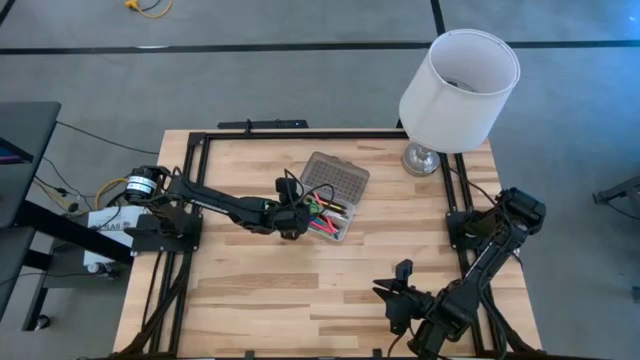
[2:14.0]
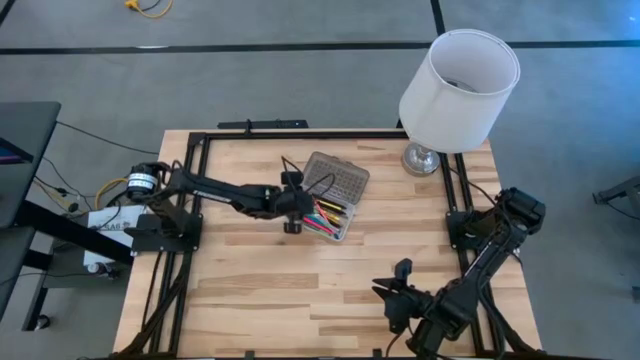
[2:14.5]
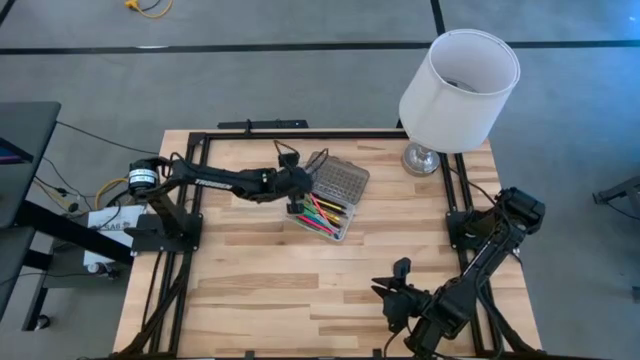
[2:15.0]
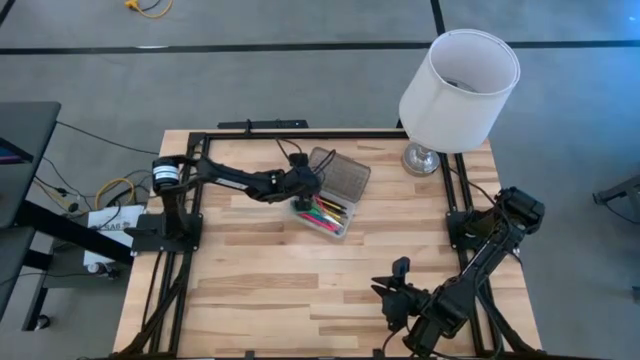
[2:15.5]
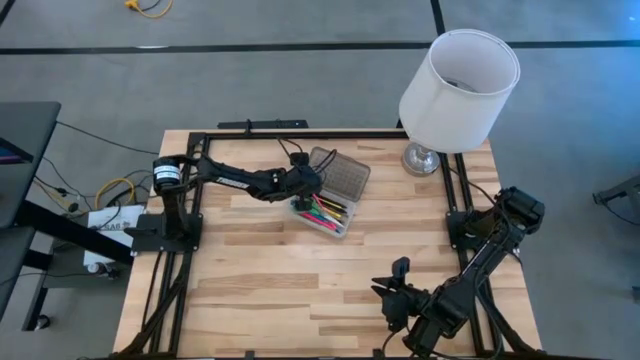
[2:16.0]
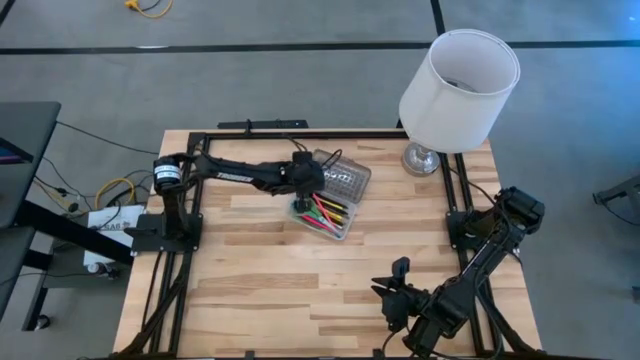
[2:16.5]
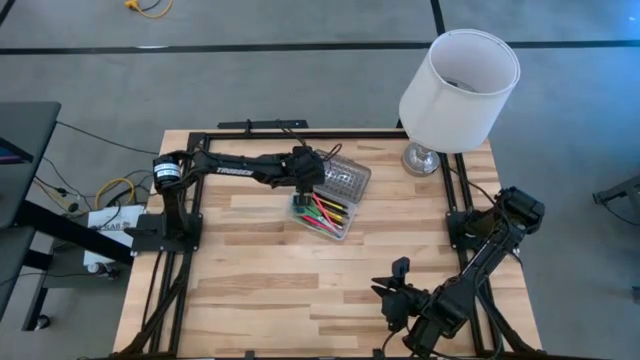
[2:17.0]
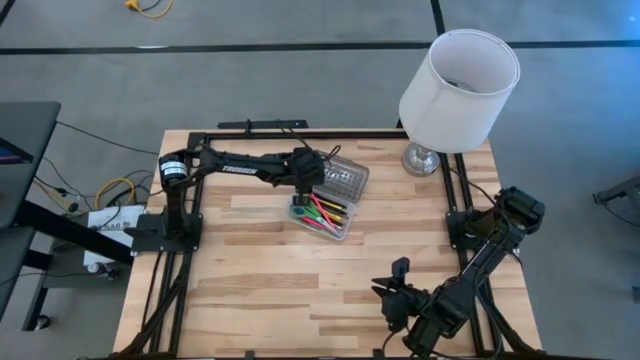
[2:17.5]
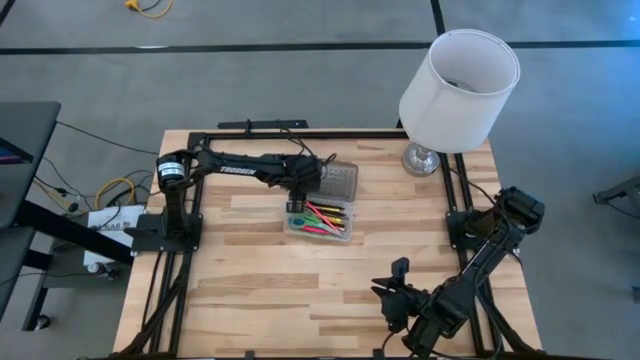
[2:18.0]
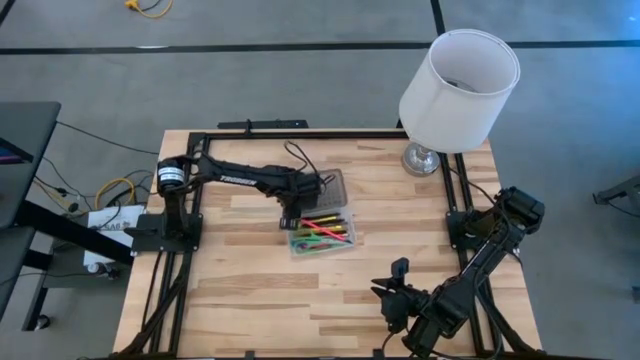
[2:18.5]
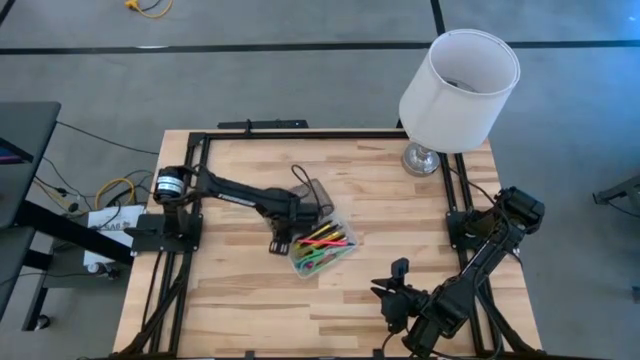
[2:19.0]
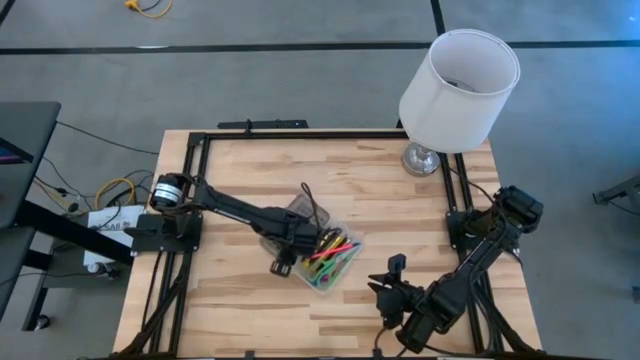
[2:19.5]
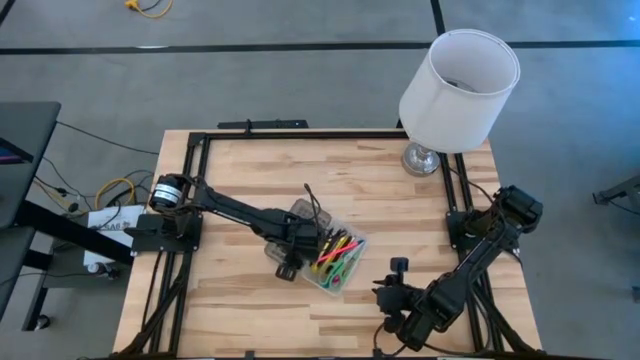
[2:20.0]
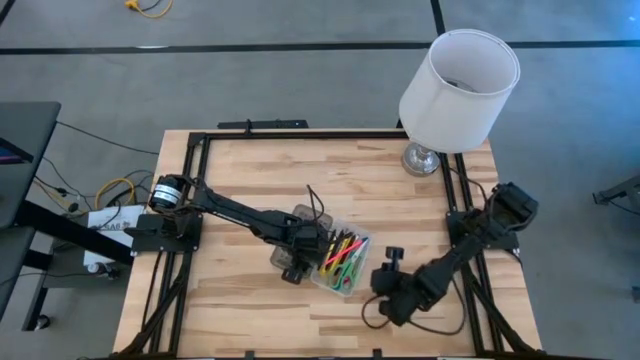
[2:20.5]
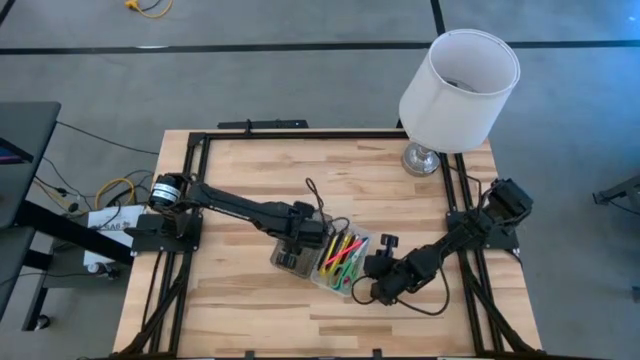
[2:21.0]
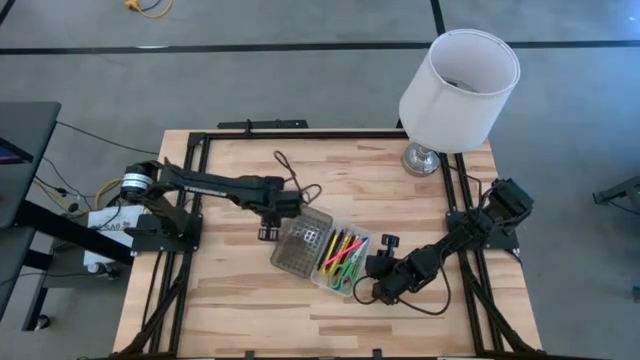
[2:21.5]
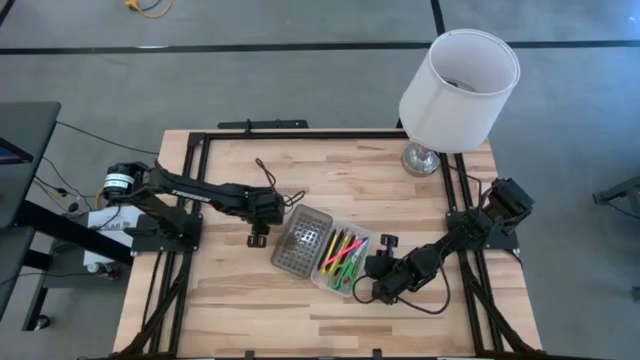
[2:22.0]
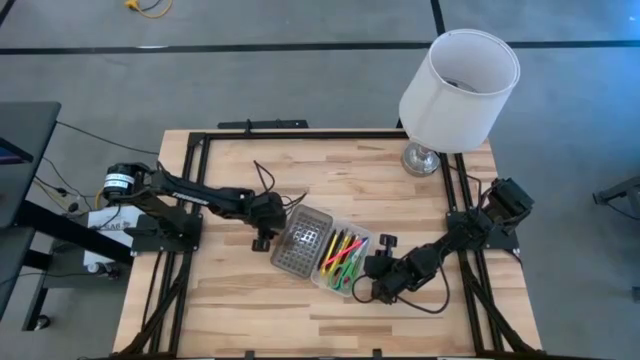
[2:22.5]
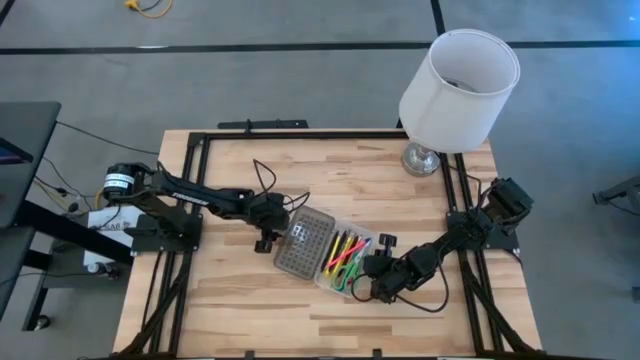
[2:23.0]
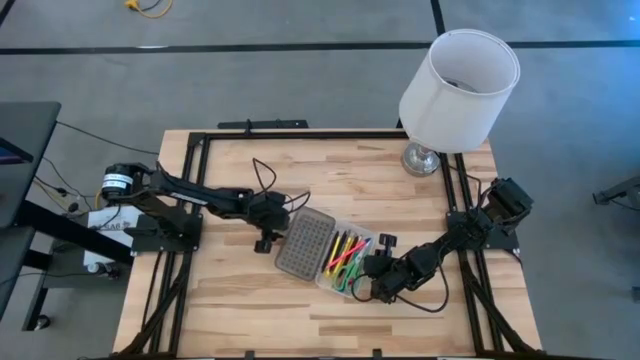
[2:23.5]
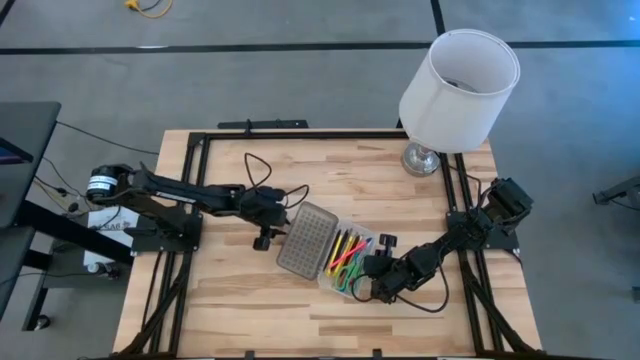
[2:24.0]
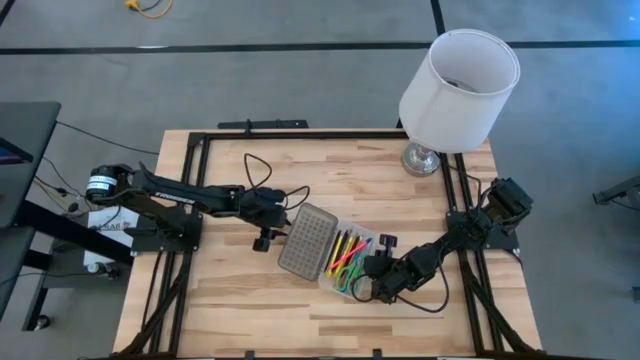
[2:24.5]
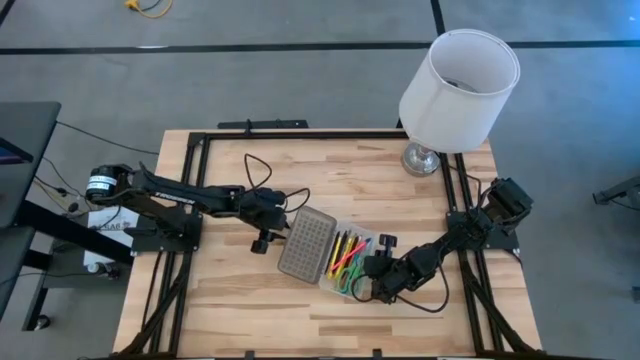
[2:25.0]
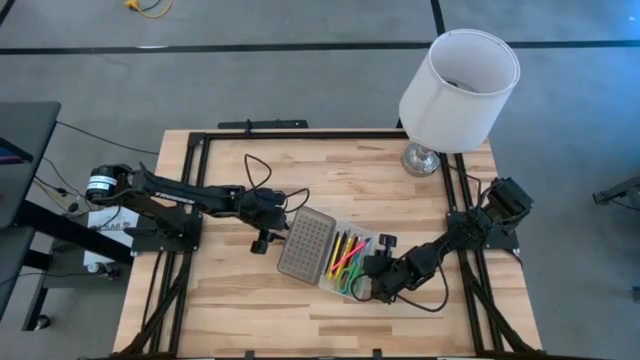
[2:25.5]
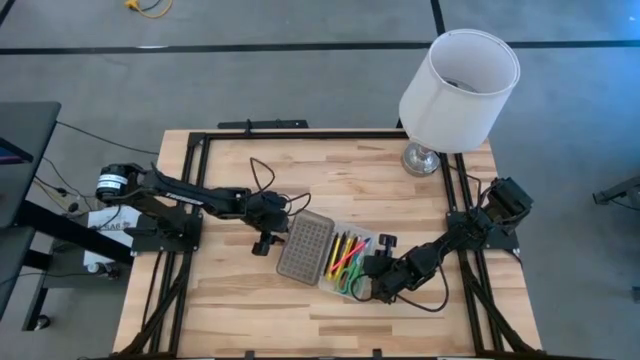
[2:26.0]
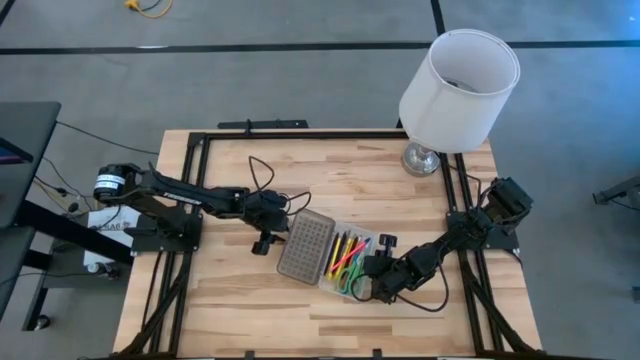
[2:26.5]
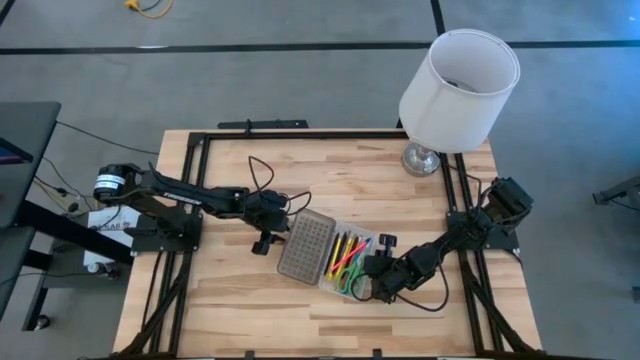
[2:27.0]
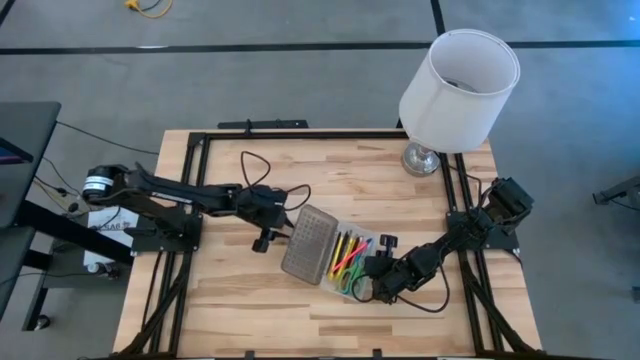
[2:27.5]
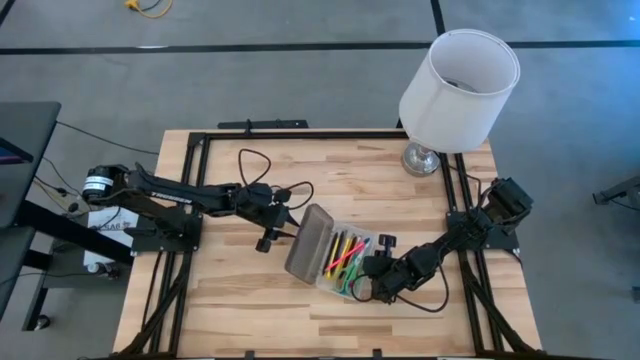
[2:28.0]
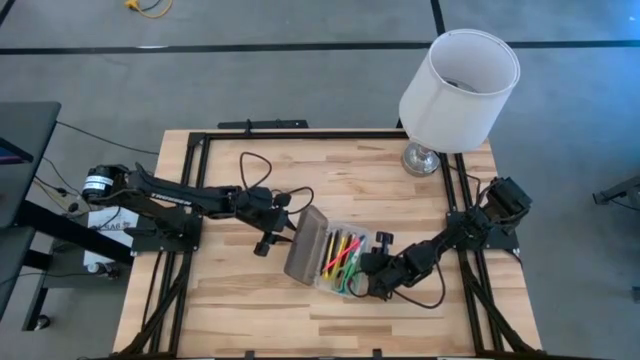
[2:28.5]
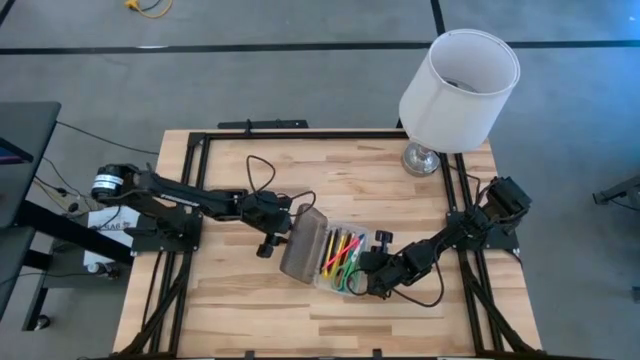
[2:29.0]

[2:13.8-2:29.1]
Task: Pick & place school supplies into a supply box
Close the gray supply box

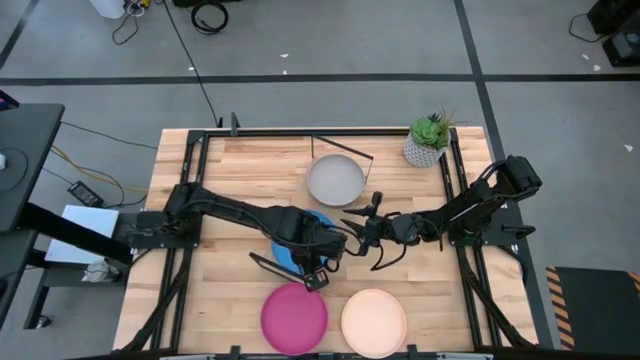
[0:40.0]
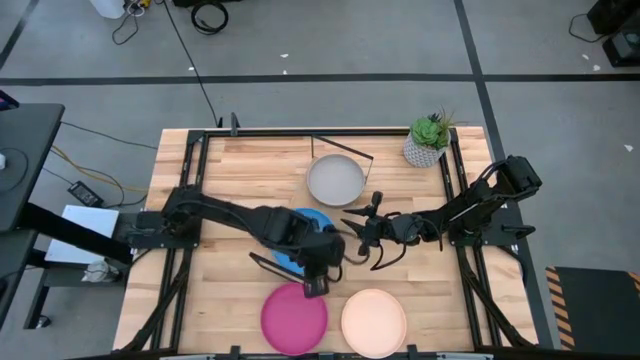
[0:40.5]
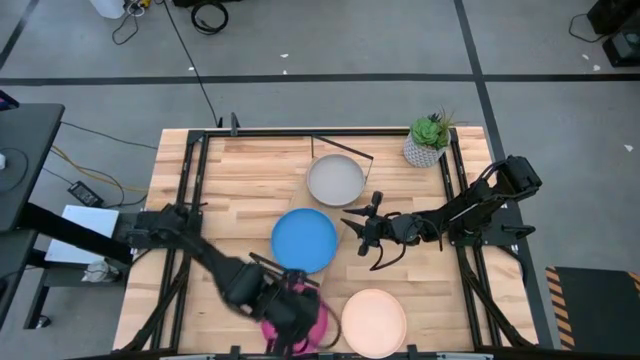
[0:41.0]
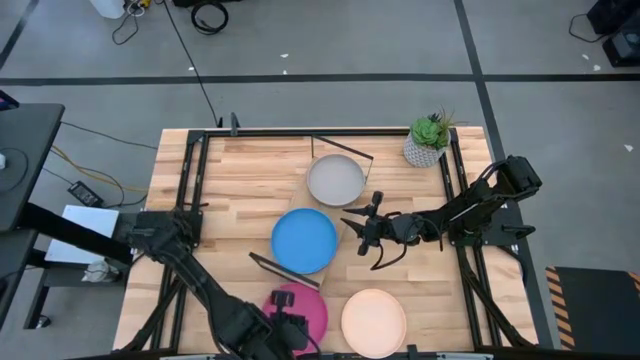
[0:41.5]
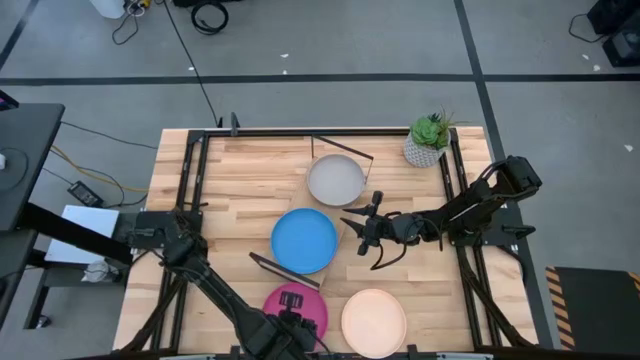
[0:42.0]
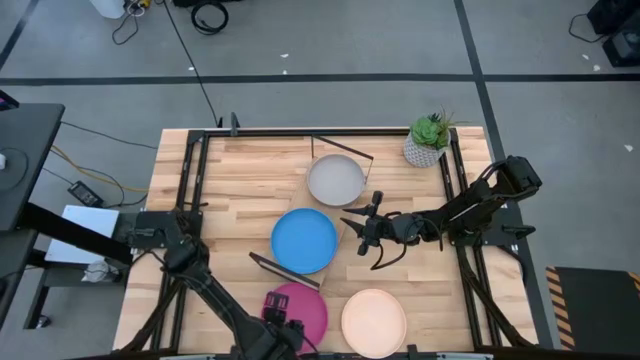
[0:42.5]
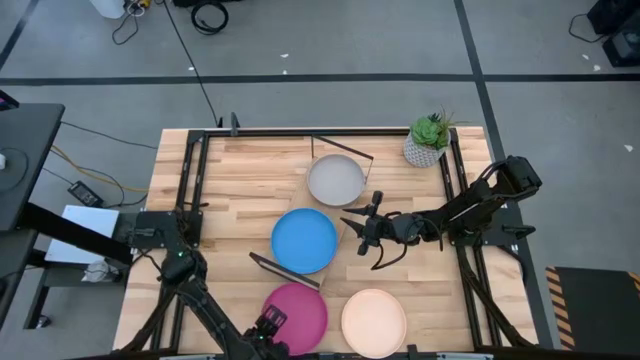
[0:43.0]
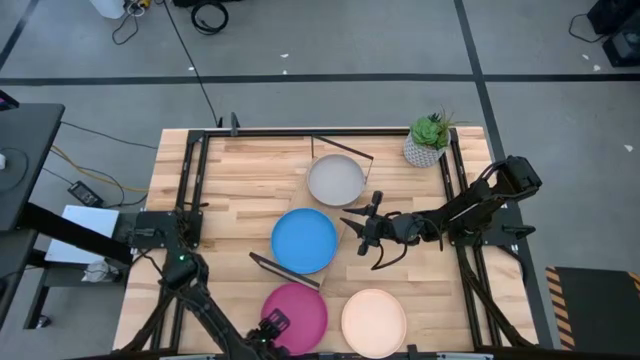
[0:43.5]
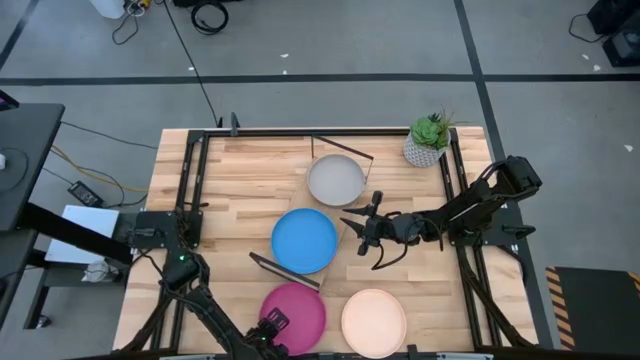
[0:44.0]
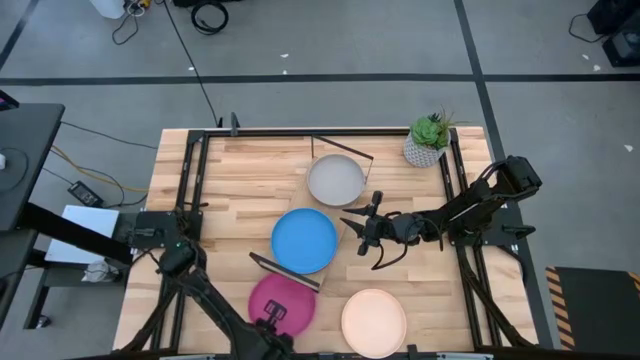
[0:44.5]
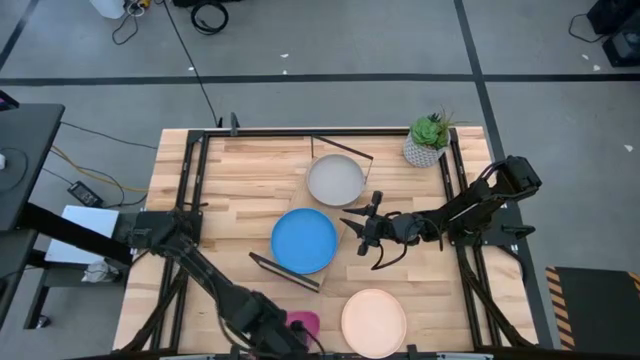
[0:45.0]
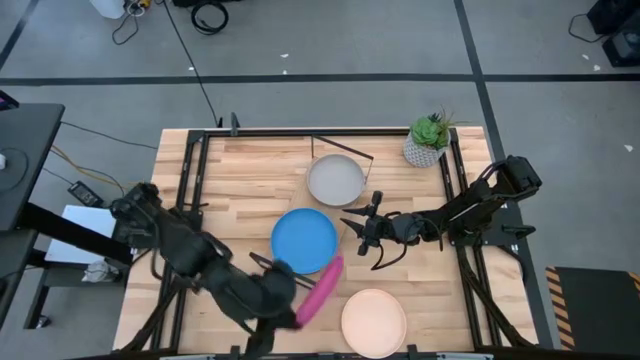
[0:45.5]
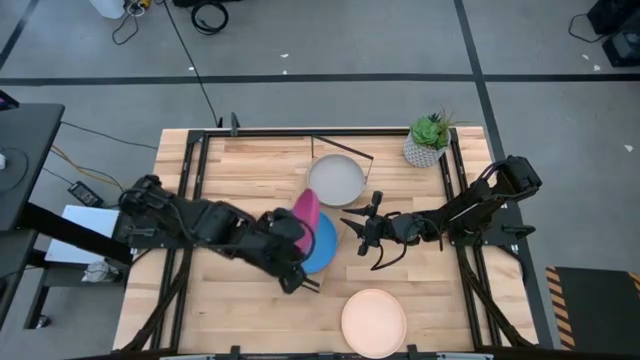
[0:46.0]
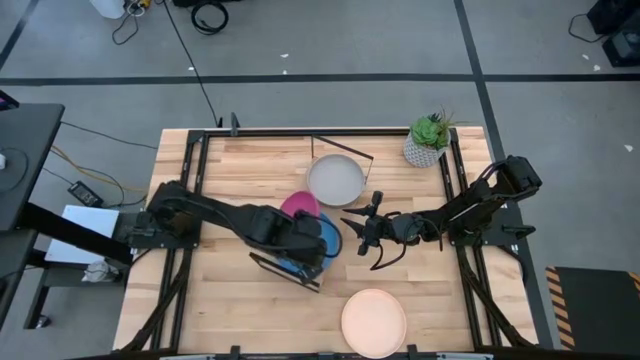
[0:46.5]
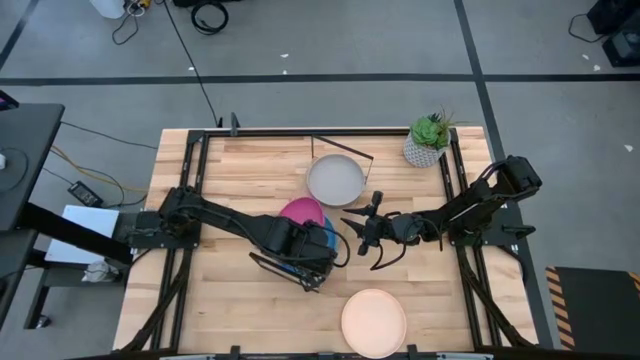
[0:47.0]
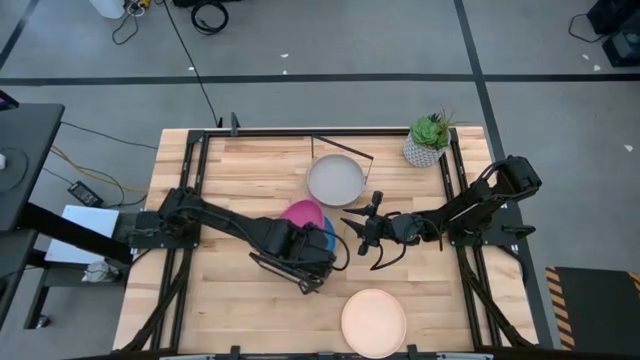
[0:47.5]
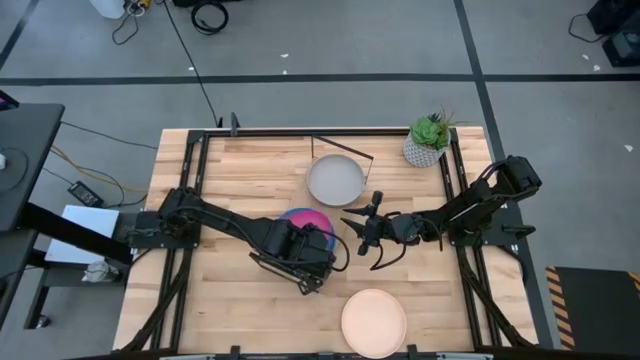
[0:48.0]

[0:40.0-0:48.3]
Task: Place and stack plates onto a shelf
Stack the pink plate on the top of the blue plate on the shelf
